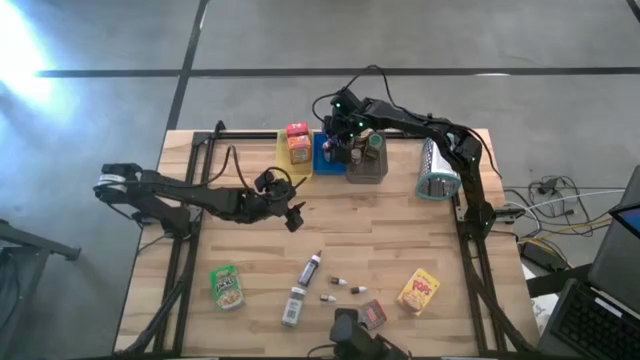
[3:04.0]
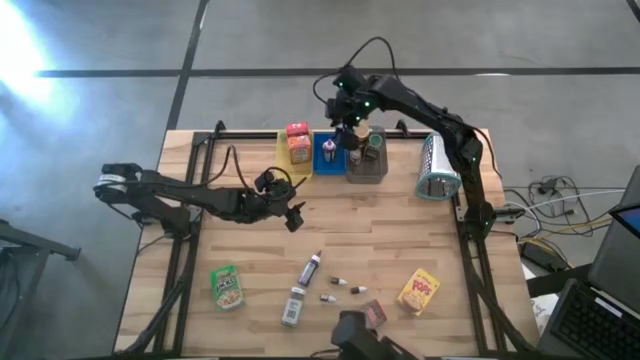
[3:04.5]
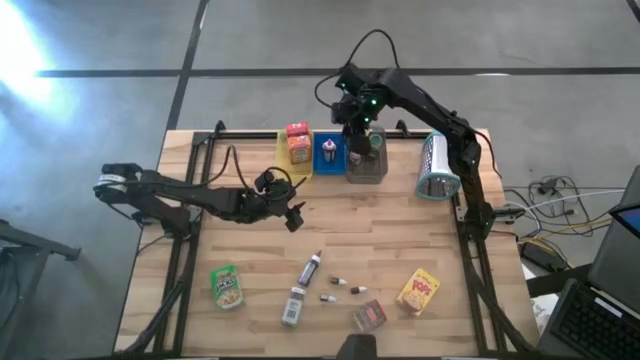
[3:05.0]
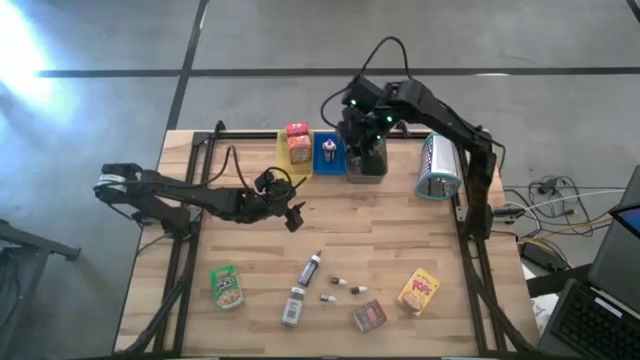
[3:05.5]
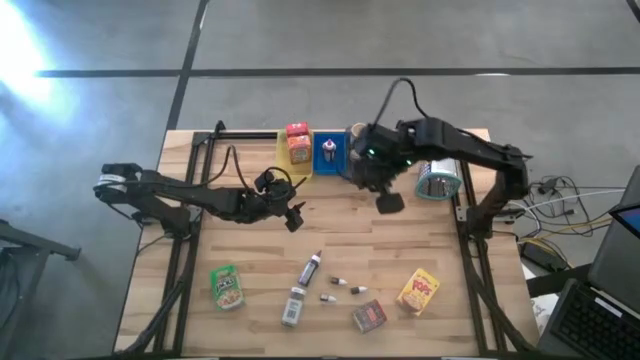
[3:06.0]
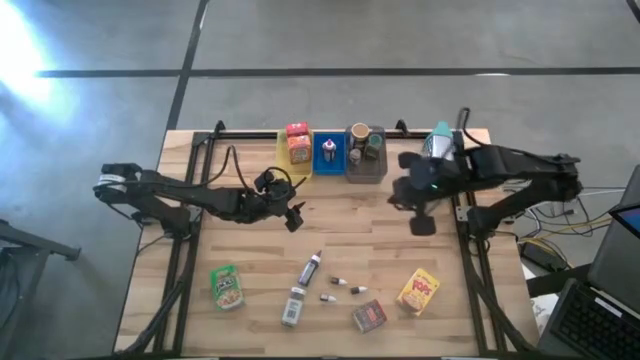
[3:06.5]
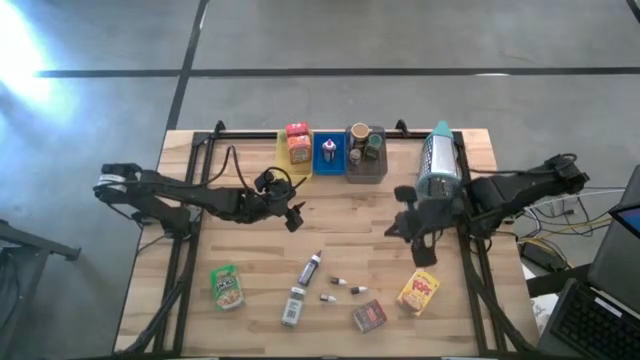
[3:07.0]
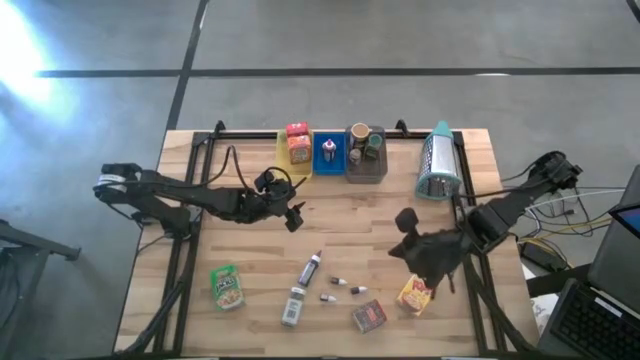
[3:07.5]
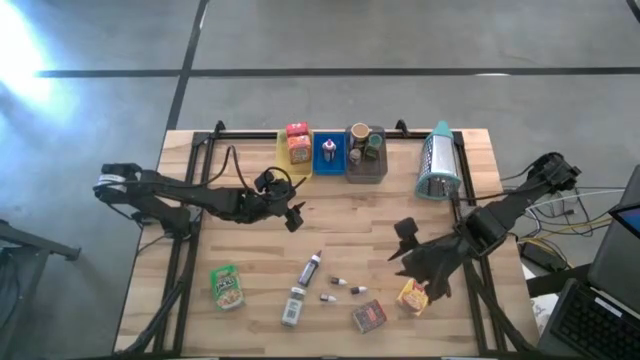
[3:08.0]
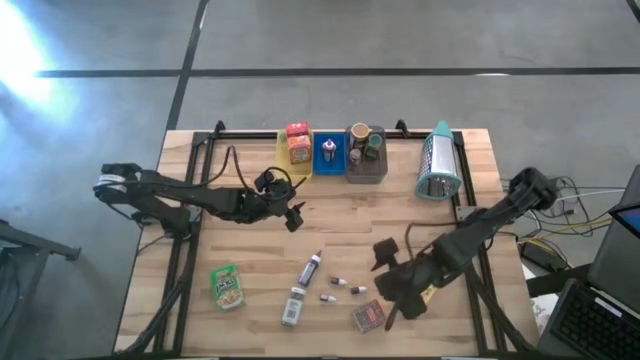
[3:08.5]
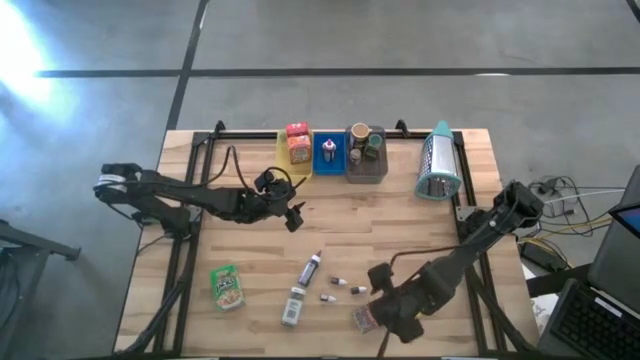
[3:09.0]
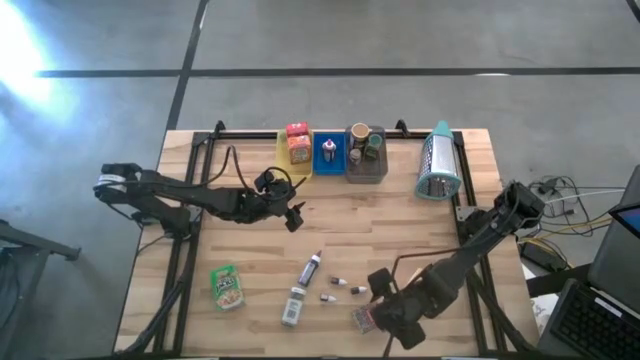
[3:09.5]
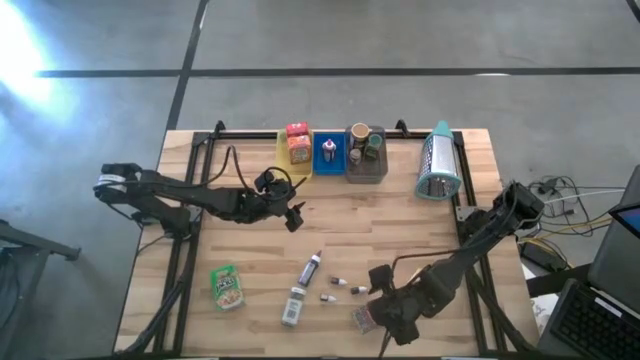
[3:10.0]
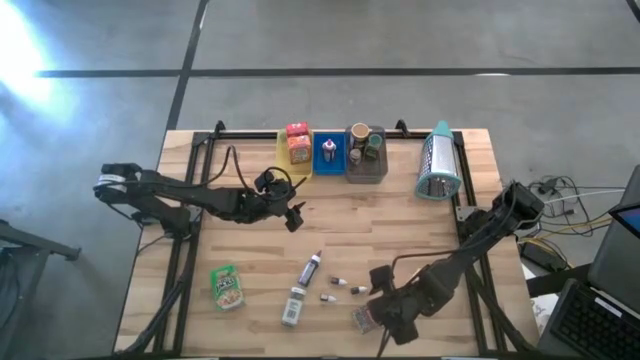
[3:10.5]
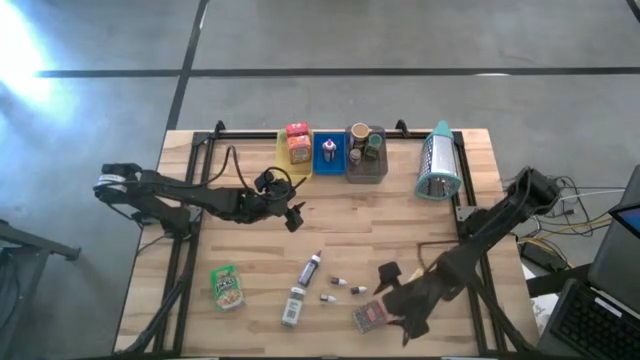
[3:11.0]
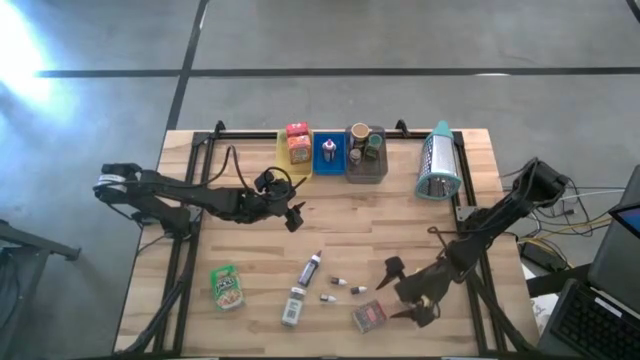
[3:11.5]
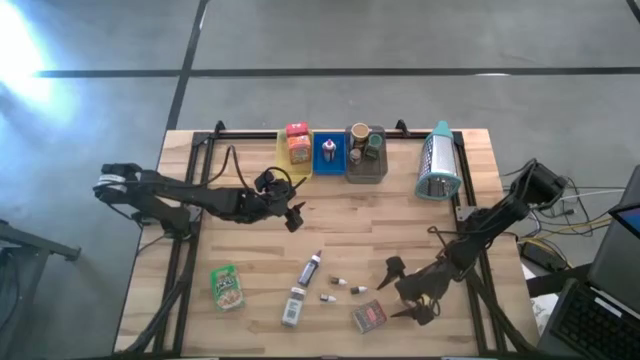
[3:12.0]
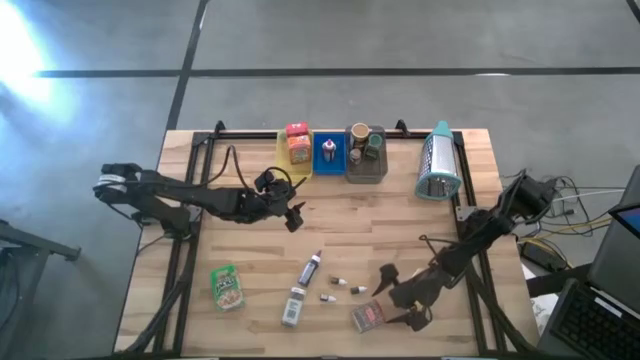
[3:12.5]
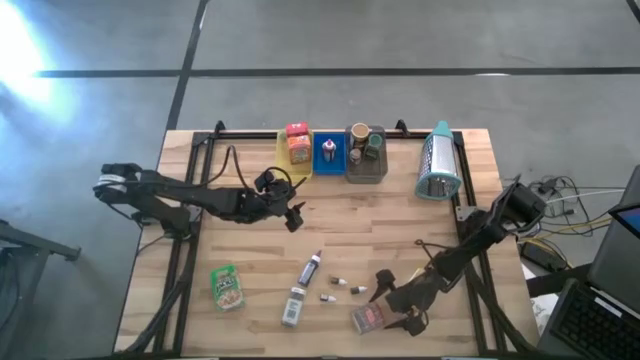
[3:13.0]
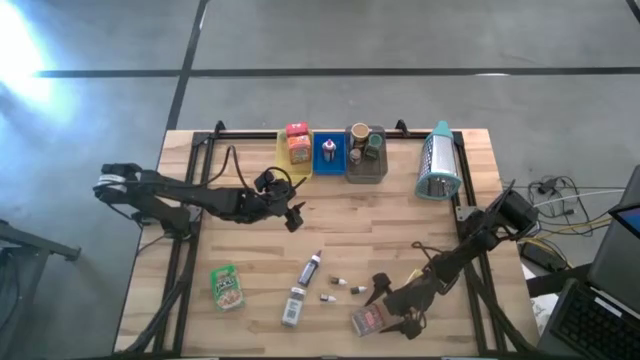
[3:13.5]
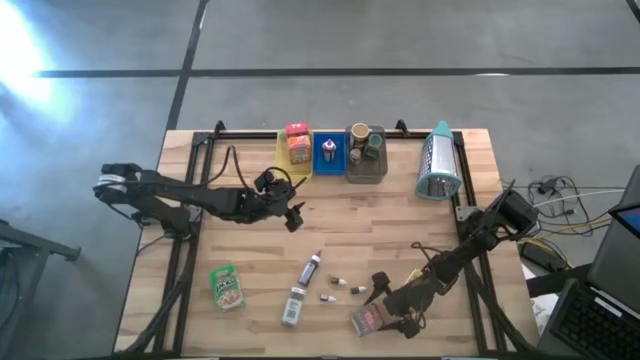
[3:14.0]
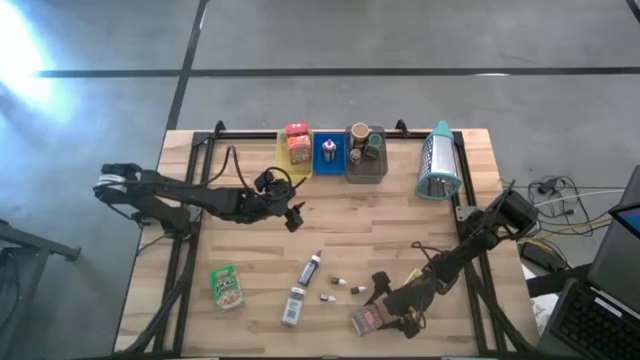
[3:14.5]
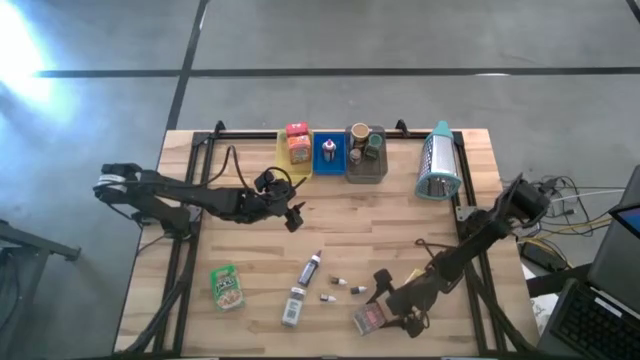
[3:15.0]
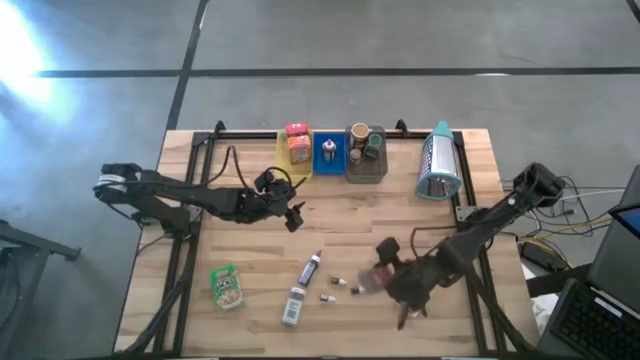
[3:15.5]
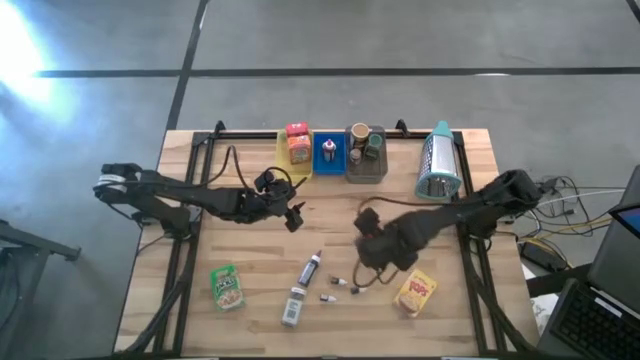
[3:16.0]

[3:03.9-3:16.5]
Task: Pick & Place Kitchen Items
Put the red seasoning can into the black bin

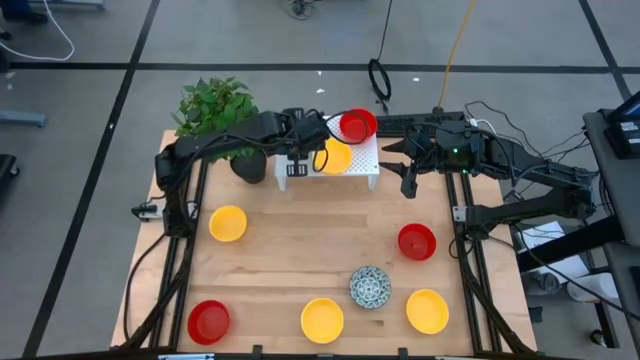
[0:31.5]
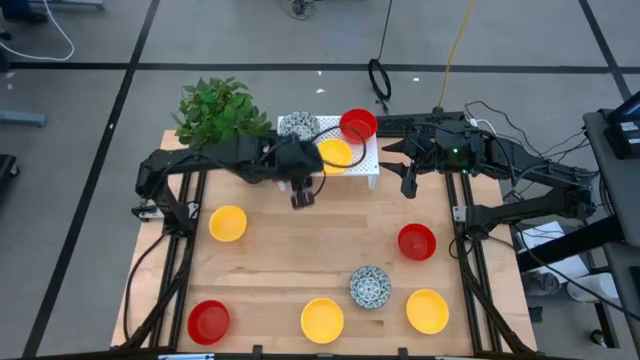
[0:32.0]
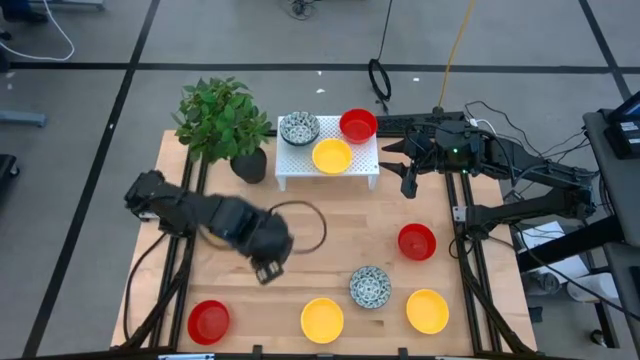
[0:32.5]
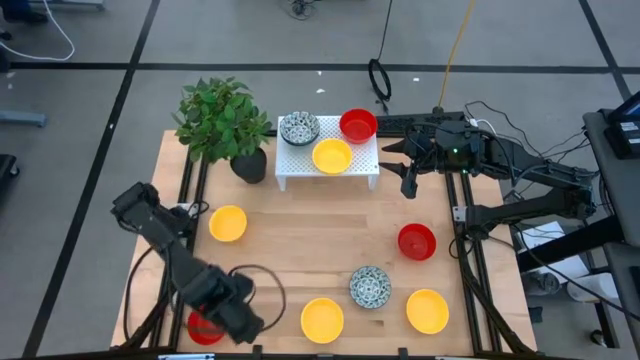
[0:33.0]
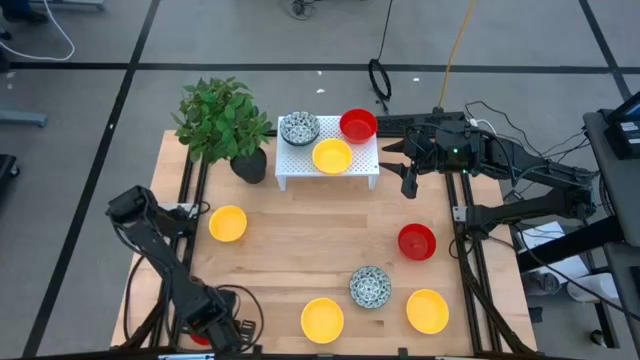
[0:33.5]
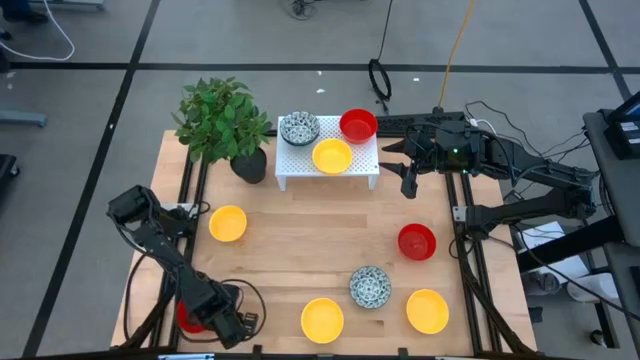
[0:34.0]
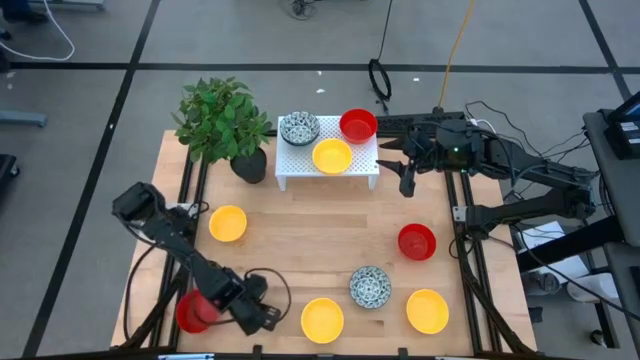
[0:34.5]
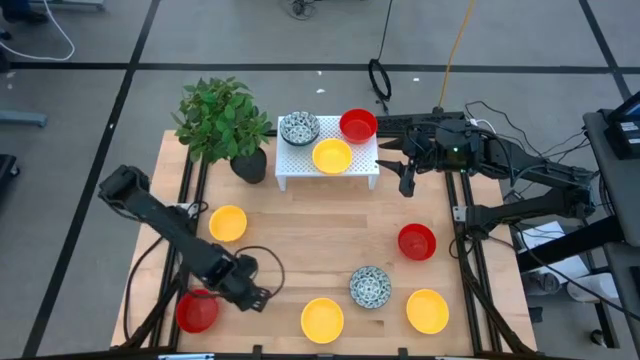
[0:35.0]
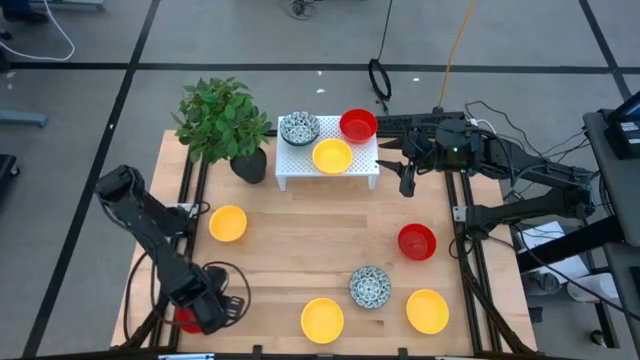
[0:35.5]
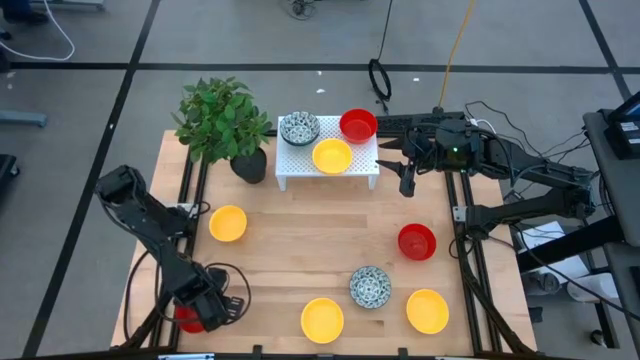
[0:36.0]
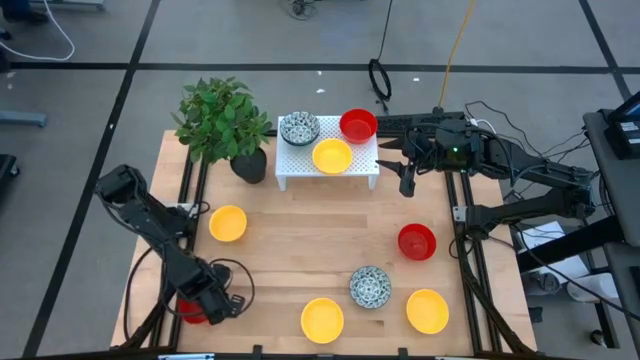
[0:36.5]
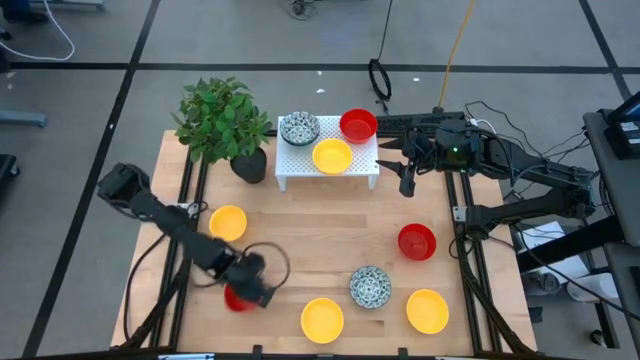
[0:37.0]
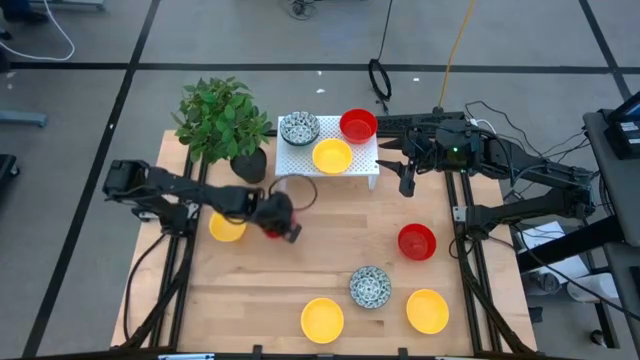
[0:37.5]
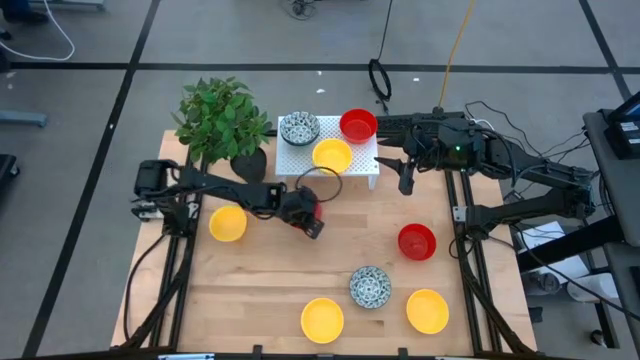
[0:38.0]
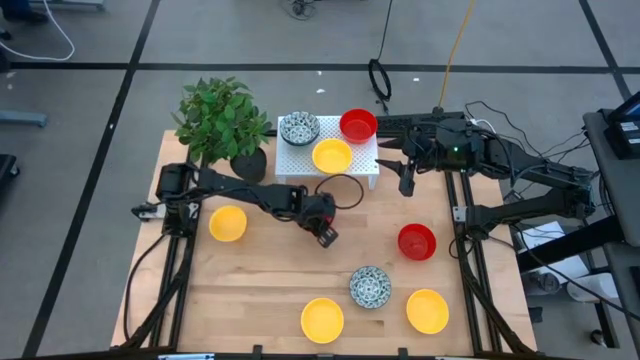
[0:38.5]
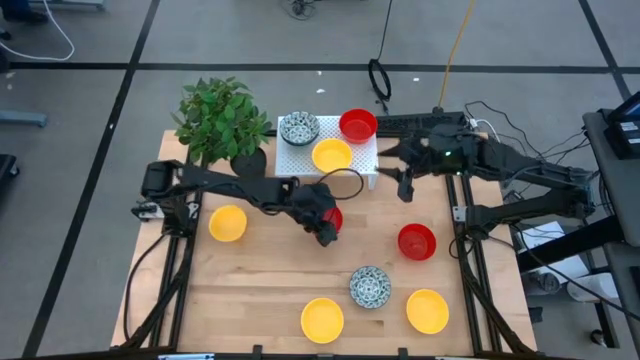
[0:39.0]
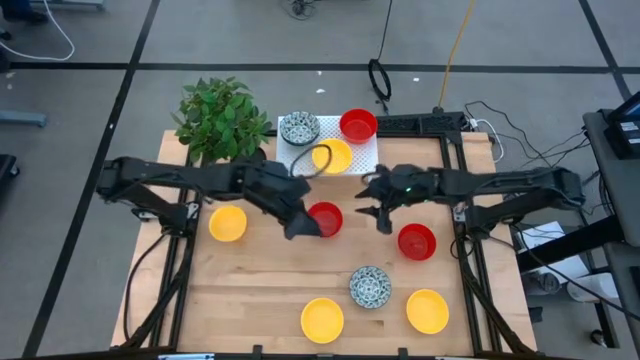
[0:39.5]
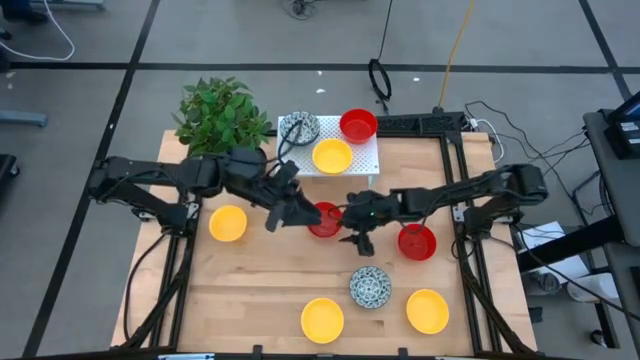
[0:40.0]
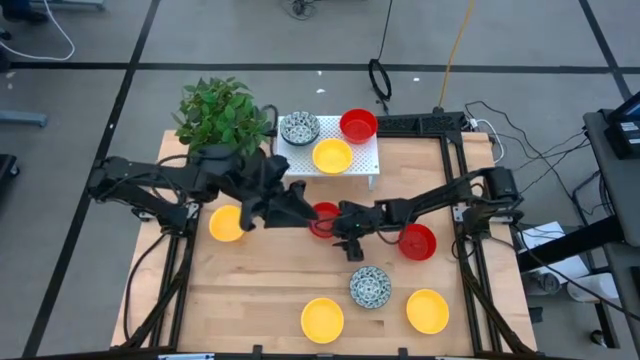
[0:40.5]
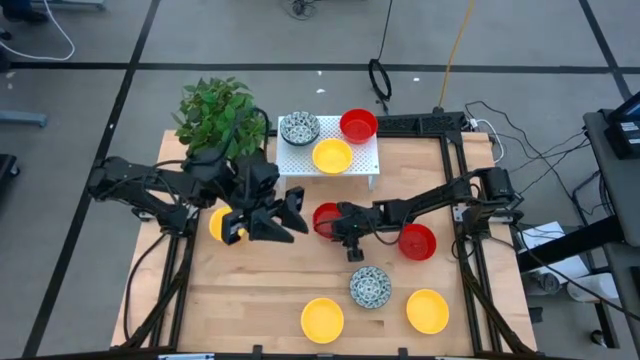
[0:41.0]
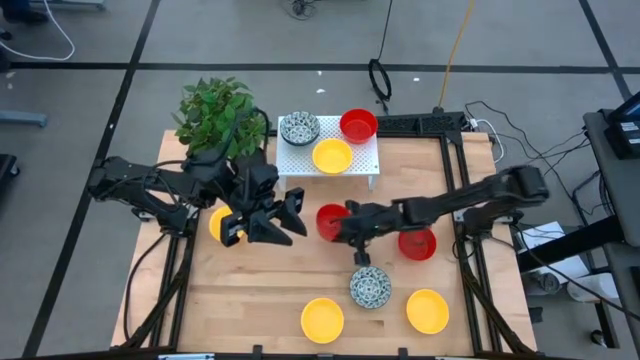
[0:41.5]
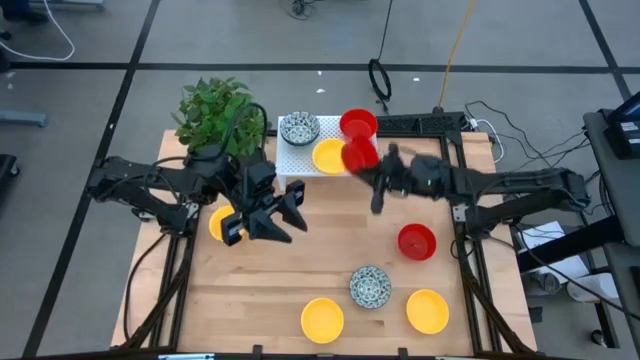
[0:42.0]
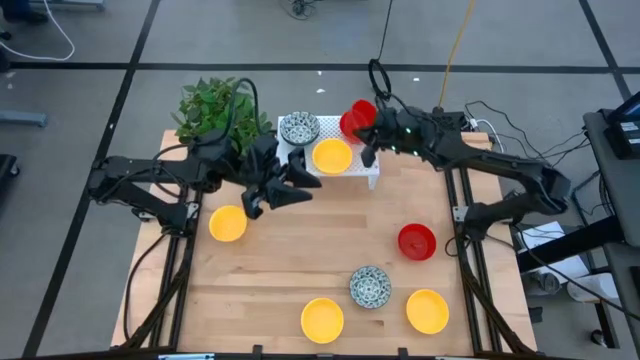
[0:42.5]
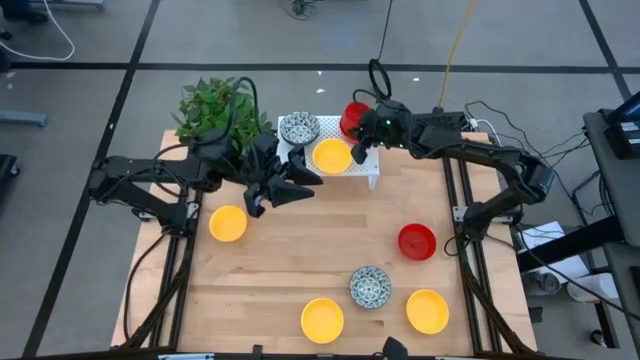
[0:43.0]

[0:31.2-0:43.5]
Task: Pick & Place Mini bowls
Stack the red bowl on top of the red bowl on the shelf
